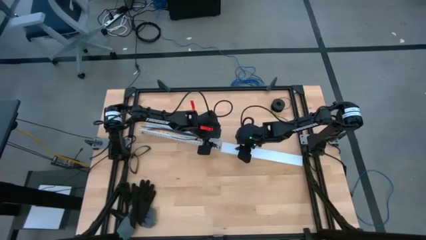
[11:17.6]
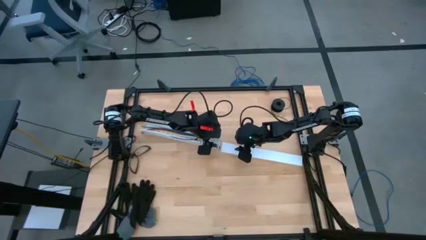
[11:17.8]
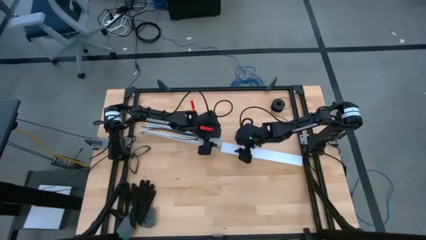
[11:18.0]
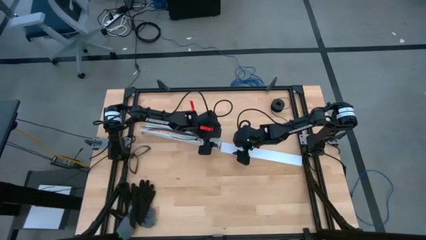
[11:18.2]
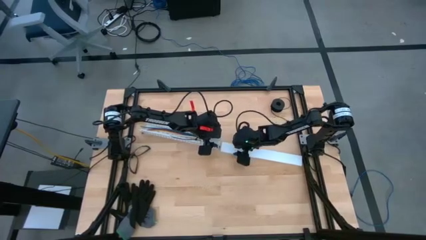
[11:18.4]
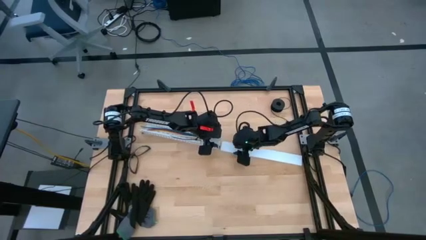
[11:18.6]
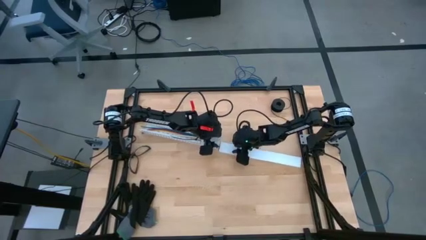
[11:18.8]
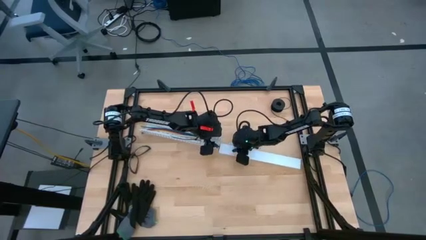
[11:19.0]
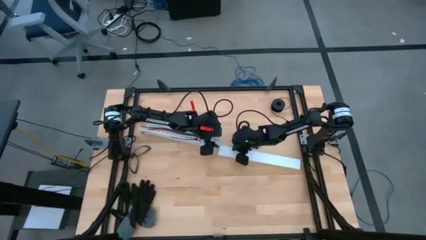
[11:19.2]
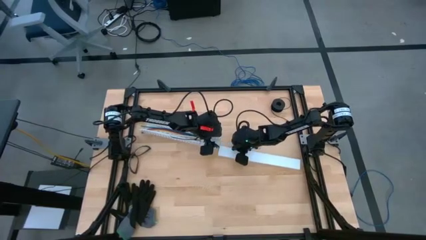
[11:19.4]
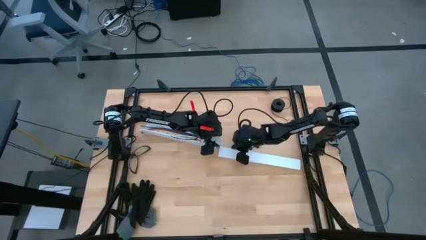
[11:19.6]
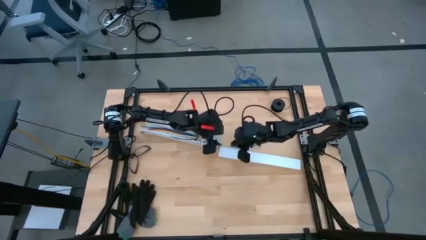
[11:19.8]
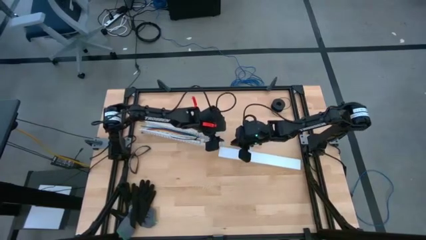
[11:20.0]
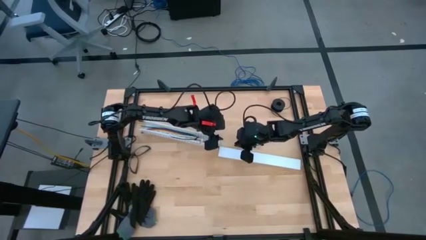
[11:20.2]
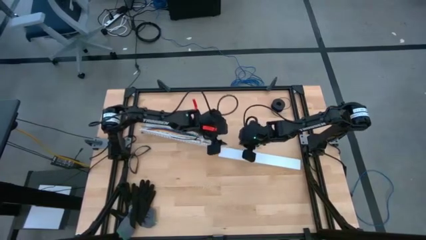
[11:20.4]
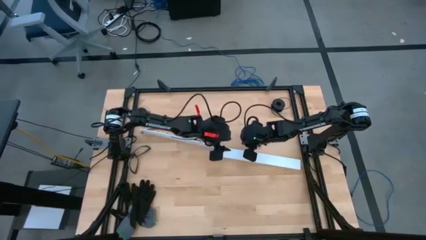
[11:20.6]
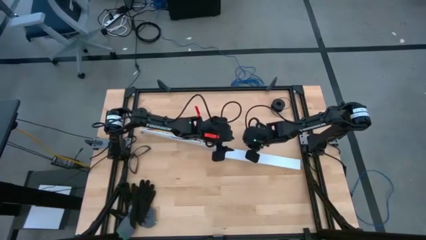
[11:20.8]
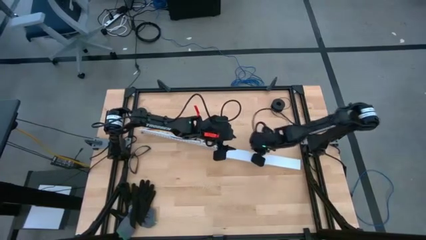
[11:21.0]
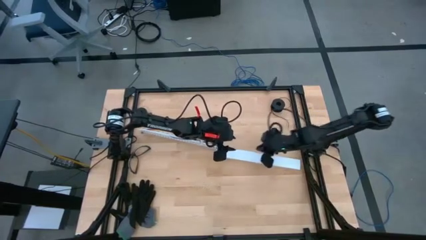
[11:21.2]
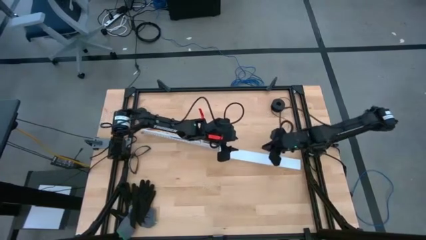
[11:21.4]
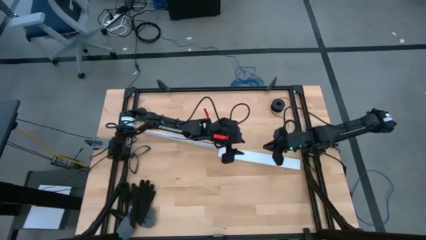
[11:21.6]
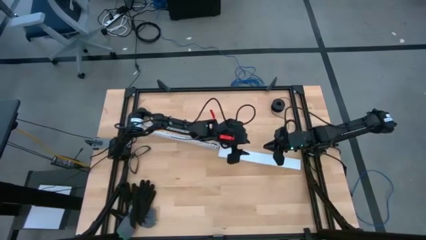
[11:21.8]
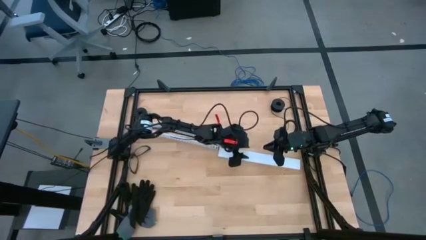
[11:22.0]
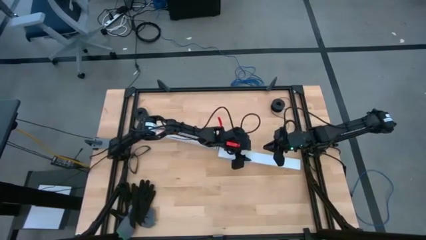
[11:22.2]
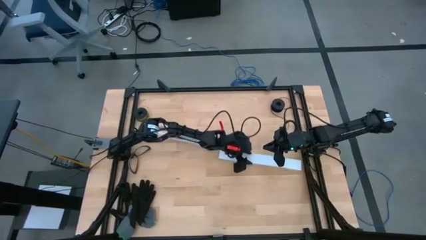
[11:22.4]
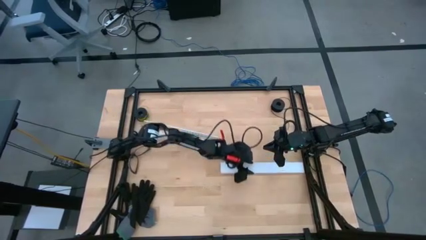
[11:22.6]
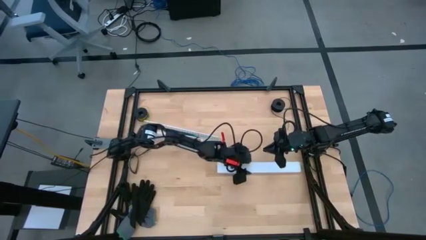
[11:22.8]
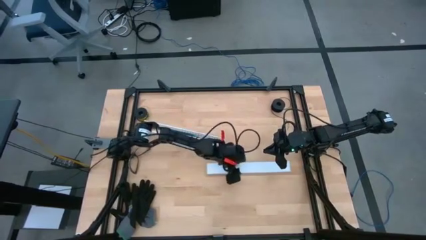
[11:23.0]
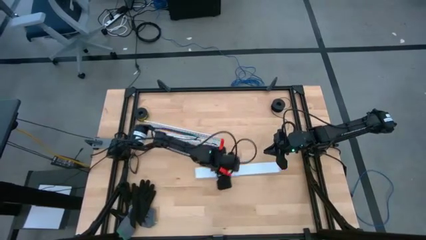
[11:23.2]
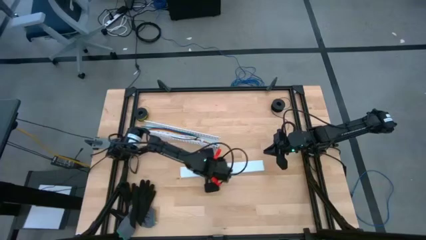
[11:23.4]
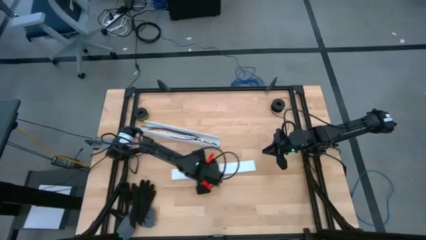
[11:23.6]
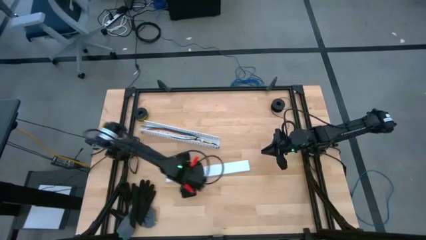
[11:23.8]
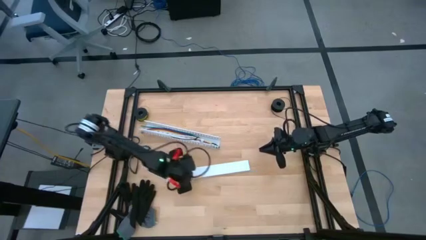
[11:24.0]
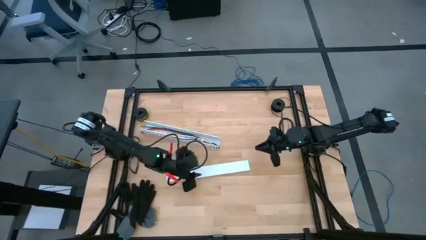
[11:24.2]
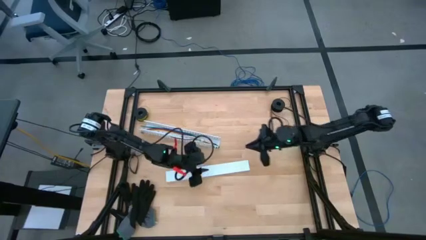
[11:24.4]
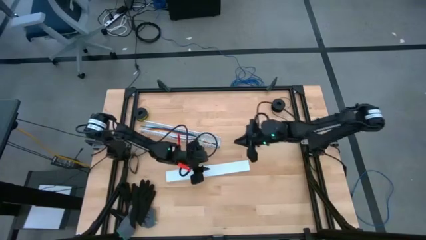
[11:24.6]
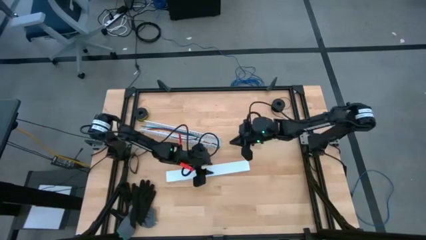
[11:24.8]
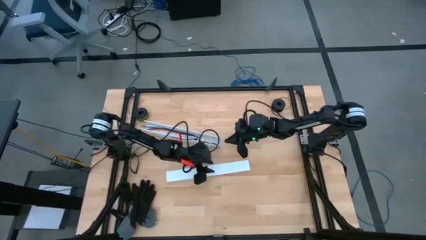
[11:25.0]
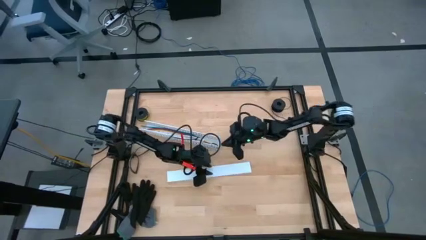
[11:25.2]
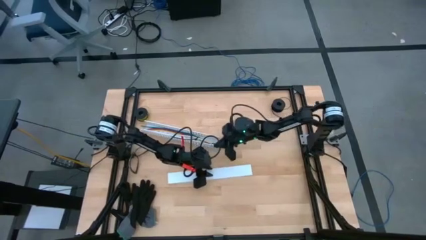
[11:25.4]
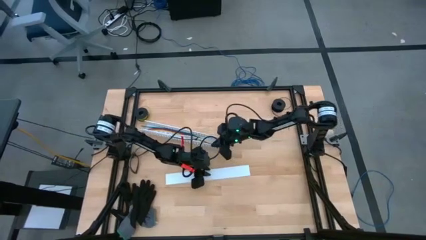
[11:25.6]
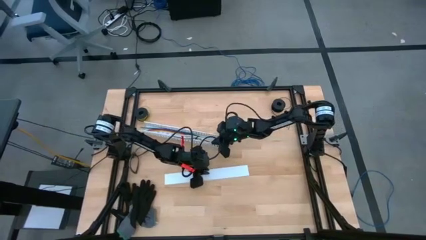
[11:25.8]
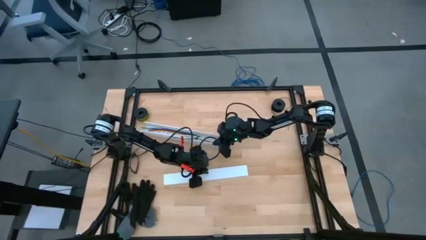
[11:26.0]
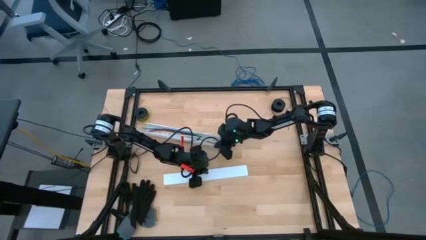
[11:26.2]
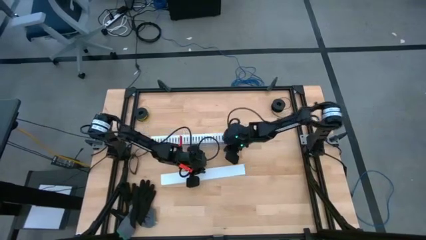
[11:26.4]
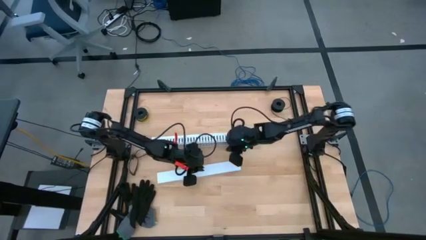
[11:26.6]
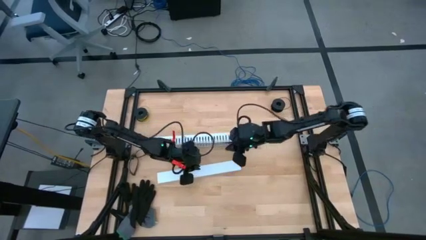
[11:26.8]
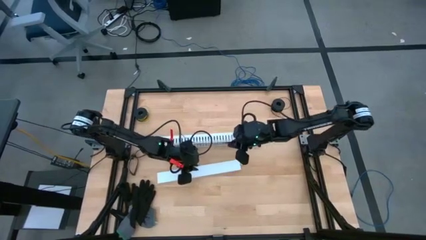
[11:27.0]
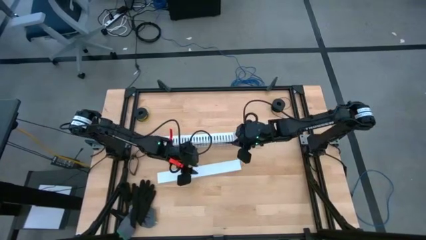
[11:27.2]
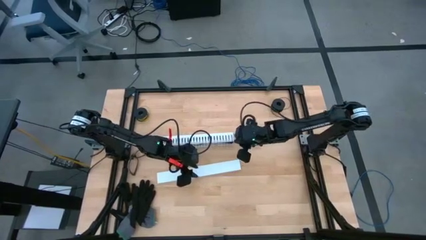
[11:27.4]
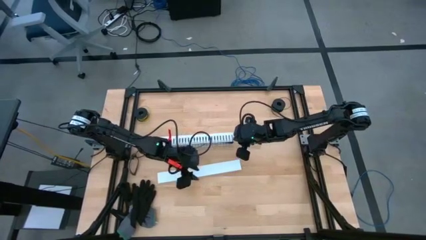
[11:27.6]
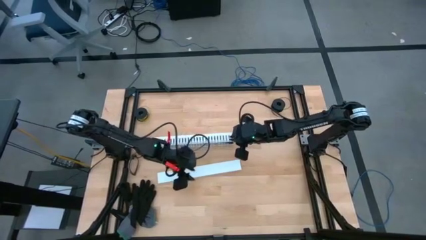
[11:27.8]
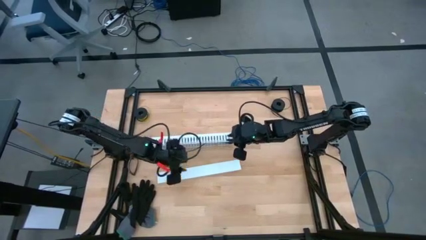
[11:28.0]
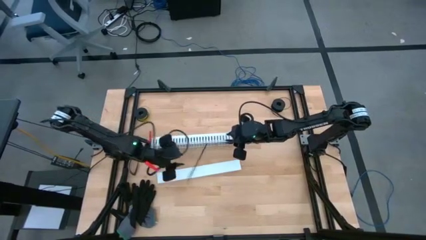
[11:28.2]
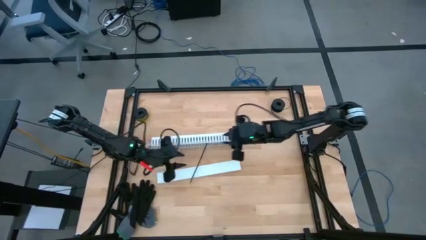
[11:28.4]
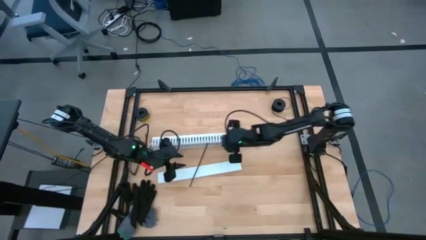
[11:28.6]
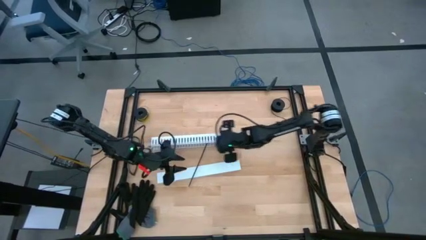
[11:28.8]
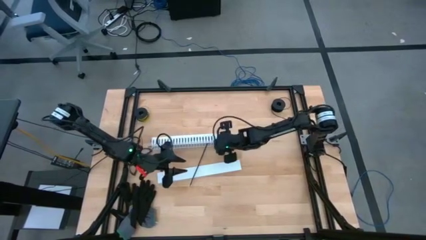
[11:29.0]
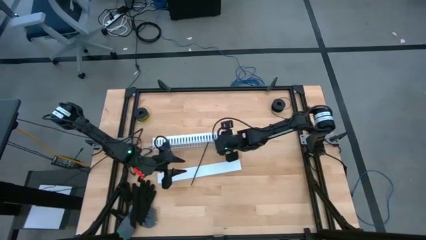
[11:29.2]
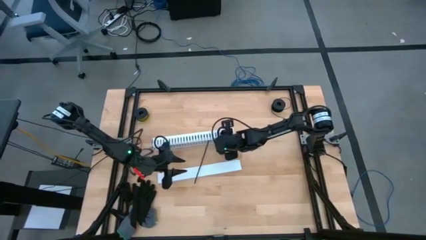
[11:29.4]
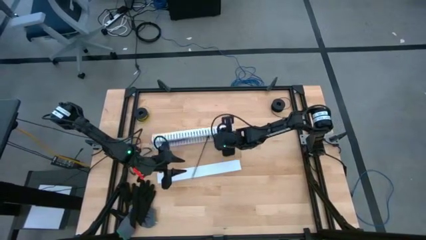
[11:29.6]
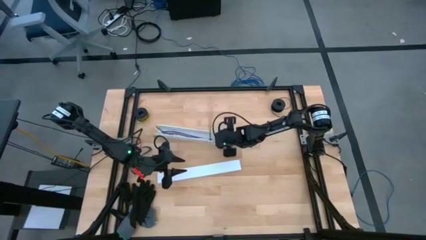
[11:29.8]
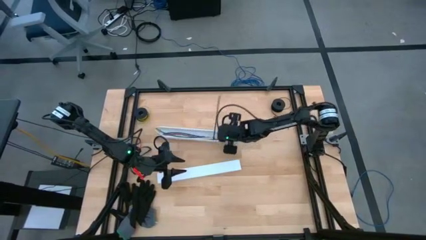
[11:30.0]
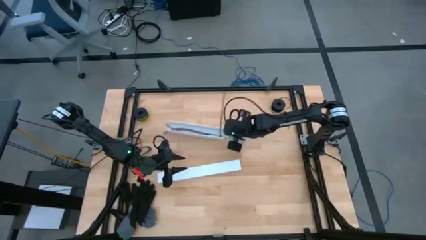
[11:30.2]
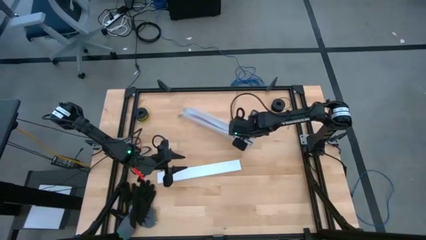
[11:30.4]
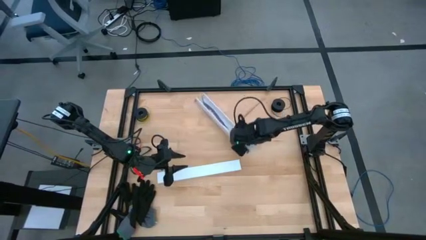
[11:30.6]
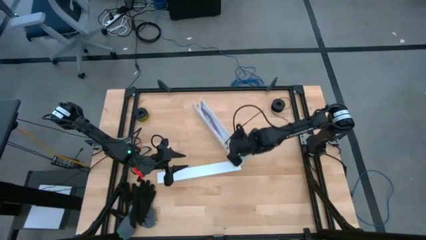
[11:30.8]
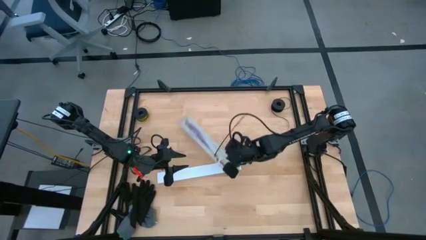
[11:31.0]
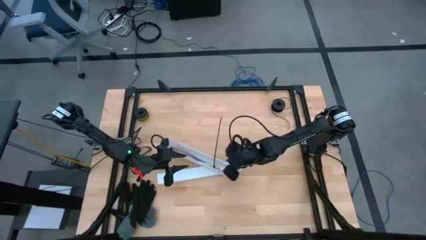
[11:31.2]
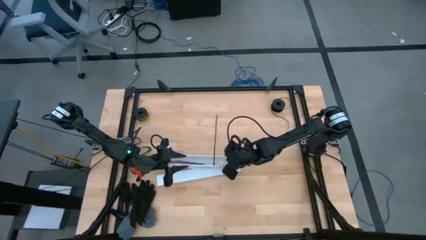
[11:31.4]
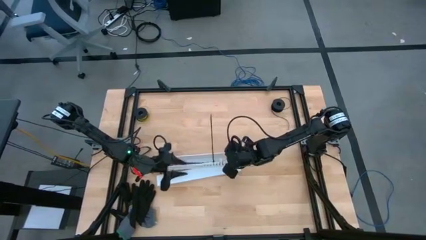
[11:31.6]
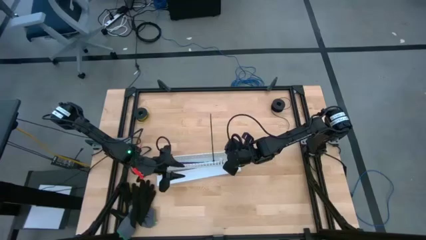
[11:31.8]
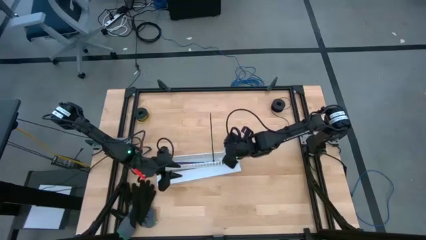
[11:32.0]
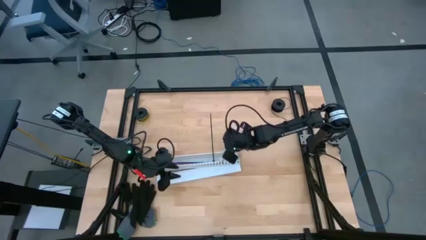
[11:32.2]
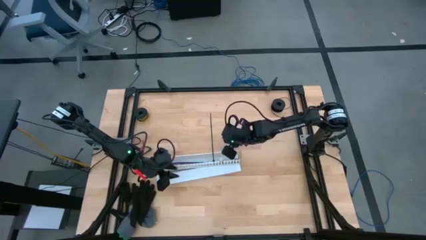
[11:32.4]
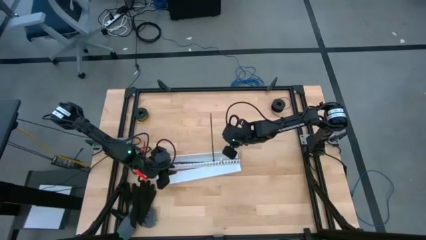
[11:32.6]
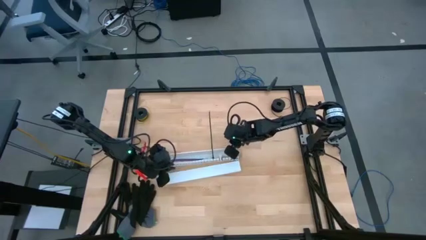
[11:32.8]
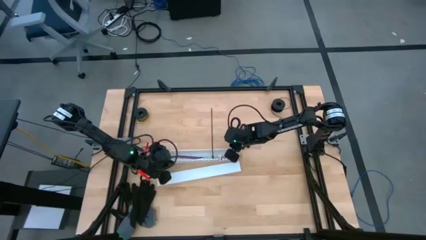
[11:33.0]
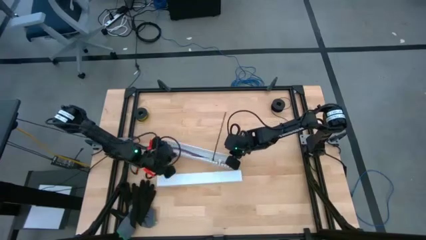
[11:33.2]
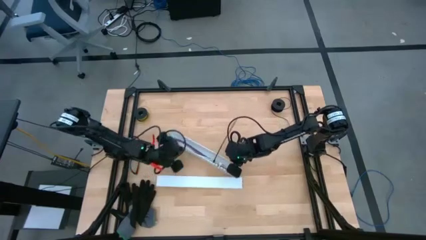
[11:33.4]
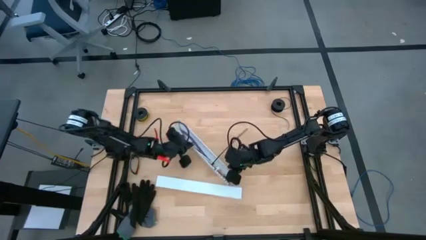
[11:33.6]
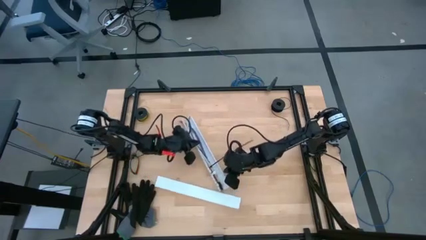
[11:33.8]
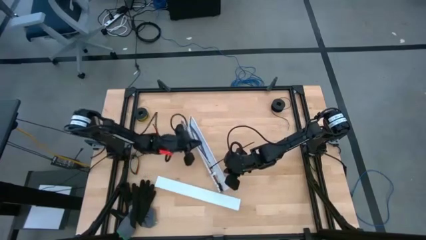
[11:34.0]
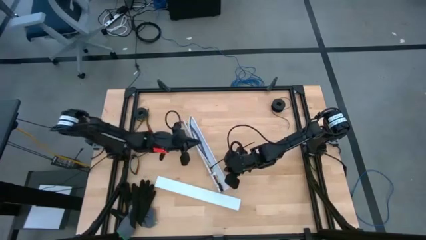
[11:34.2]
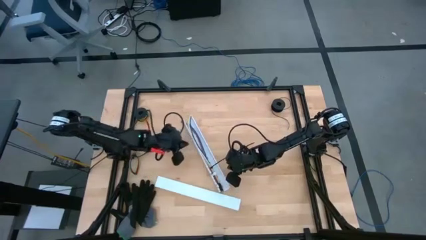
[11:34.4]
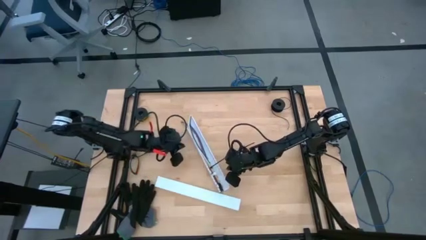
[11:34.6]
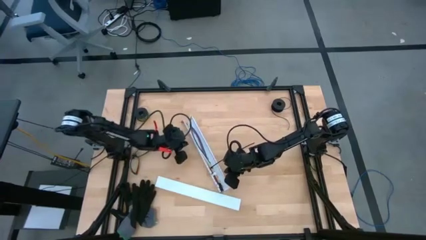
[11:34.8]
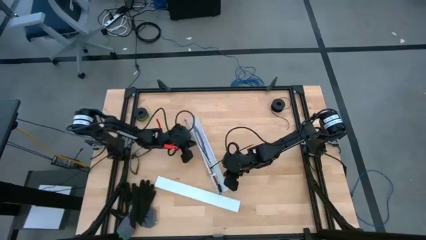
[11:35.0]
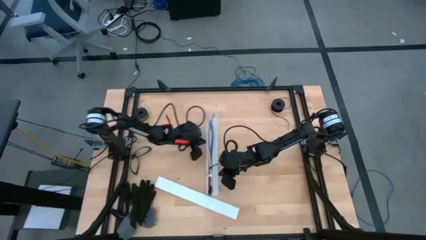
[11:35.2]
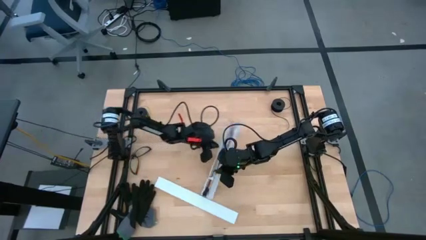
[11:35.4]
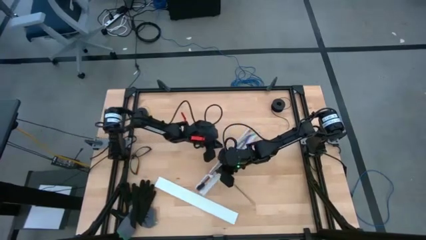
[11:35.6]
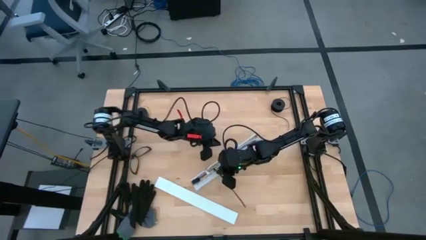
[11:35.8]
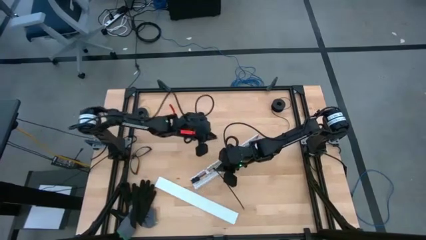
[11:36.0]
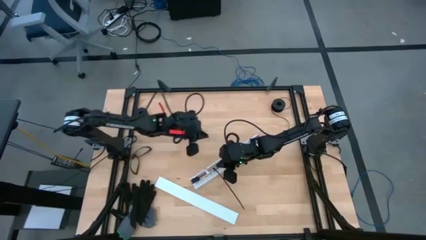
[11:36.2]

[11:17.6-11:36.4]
Task: Ziptie cables
Close the white cable duct
